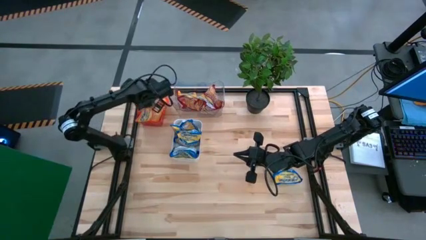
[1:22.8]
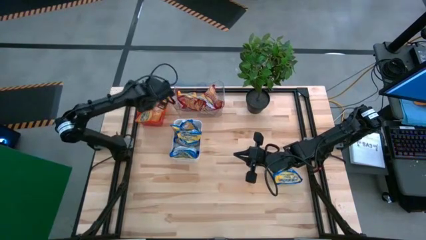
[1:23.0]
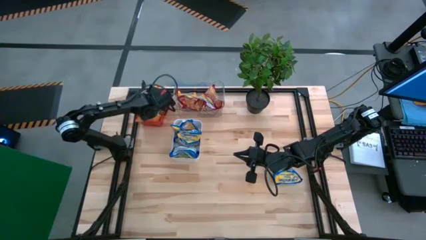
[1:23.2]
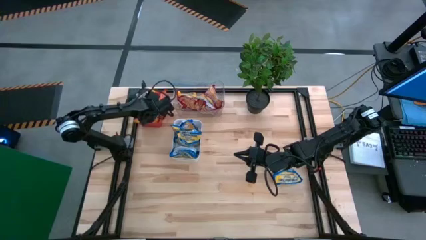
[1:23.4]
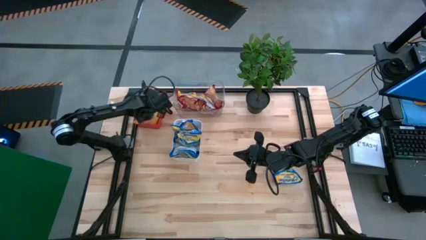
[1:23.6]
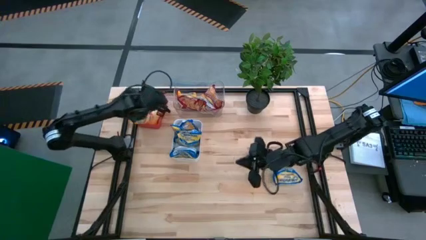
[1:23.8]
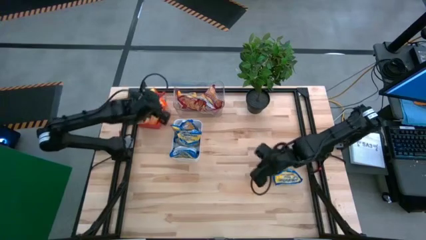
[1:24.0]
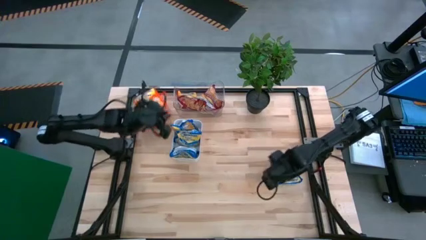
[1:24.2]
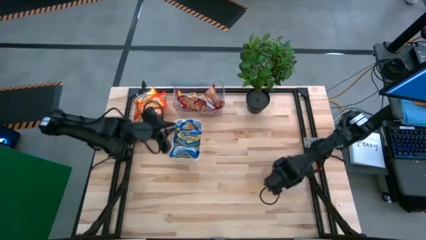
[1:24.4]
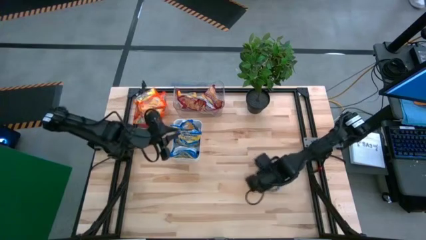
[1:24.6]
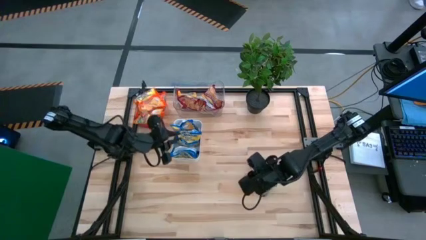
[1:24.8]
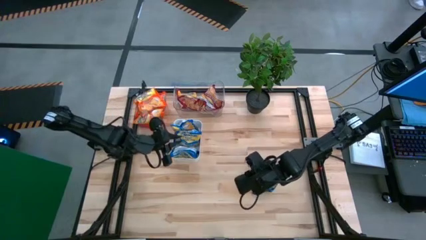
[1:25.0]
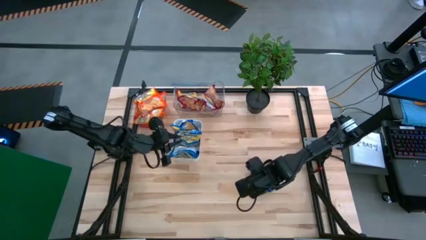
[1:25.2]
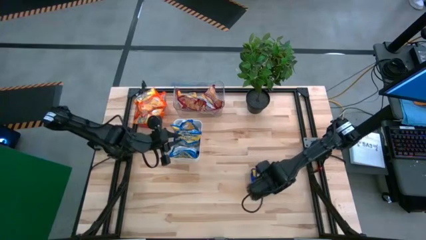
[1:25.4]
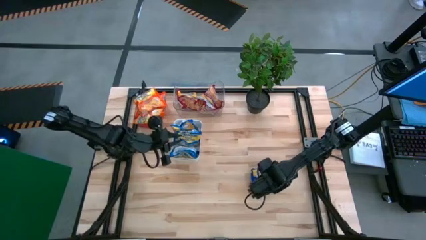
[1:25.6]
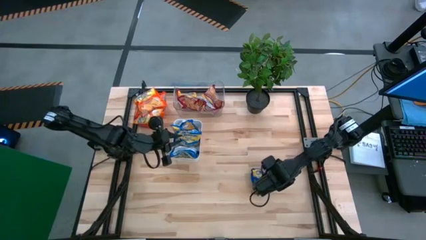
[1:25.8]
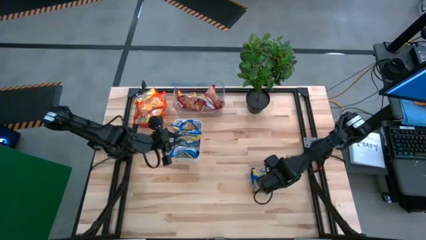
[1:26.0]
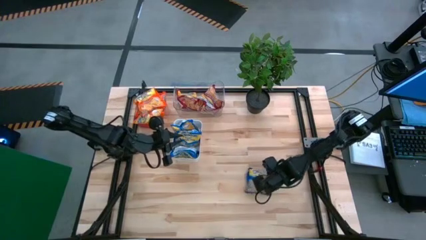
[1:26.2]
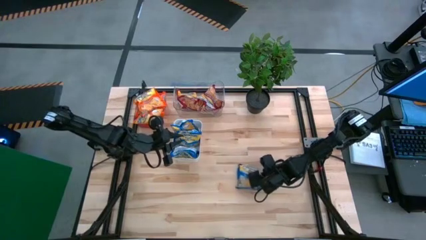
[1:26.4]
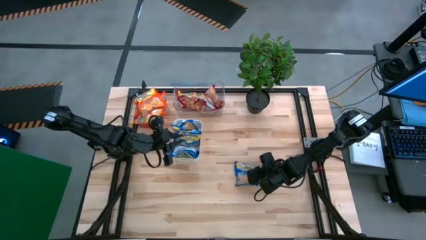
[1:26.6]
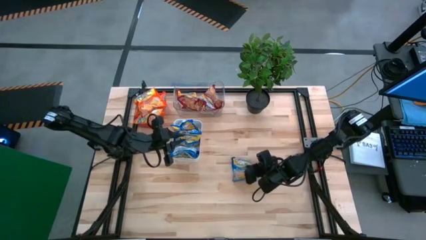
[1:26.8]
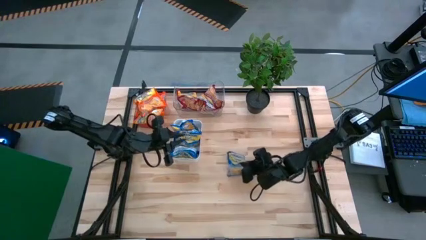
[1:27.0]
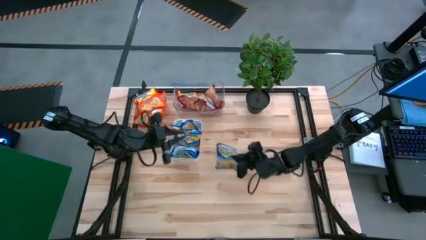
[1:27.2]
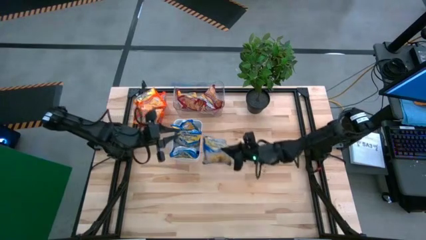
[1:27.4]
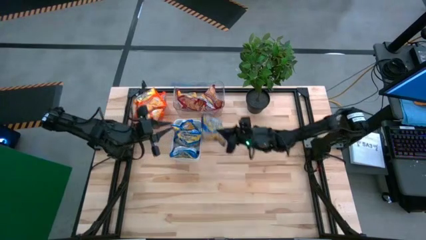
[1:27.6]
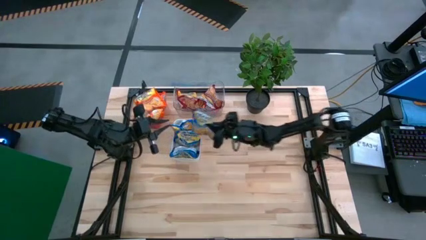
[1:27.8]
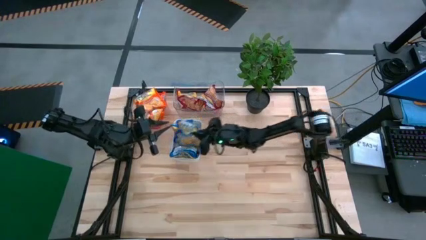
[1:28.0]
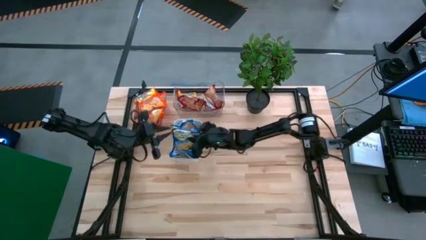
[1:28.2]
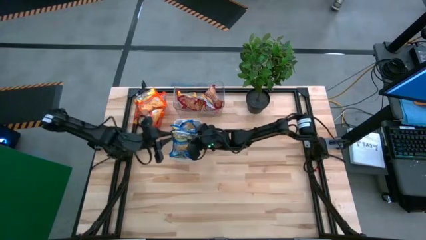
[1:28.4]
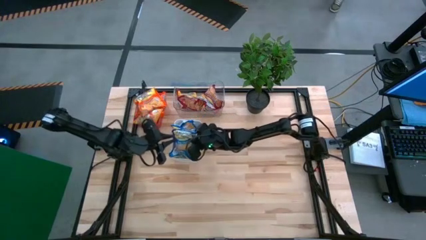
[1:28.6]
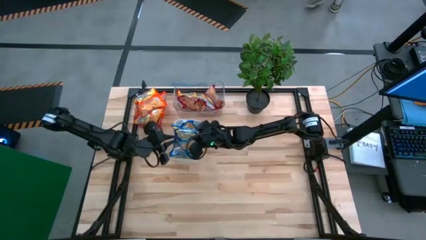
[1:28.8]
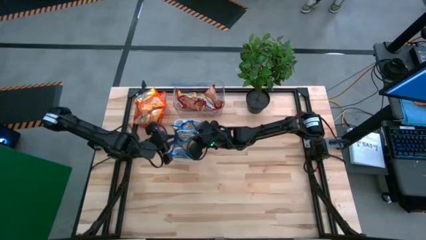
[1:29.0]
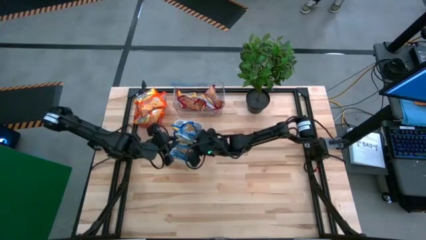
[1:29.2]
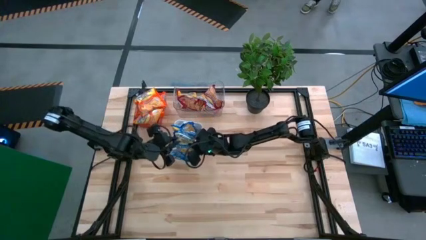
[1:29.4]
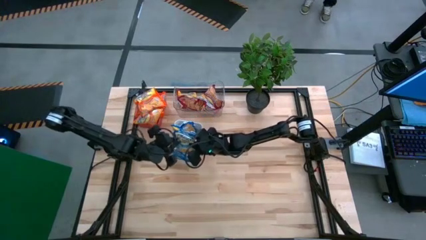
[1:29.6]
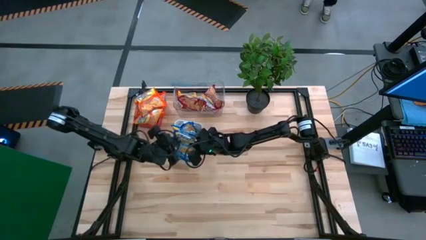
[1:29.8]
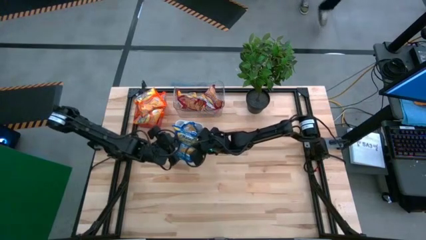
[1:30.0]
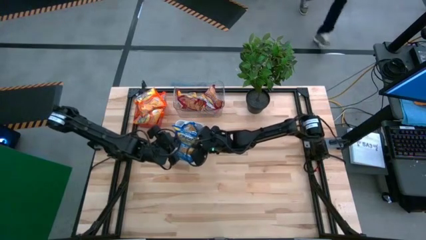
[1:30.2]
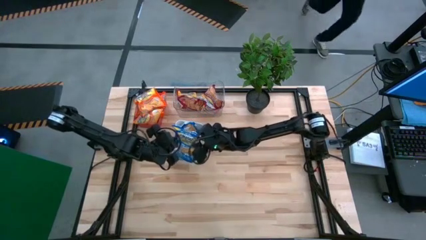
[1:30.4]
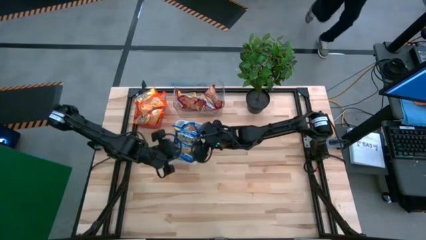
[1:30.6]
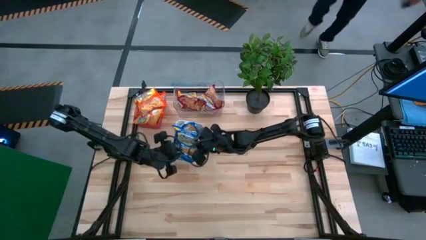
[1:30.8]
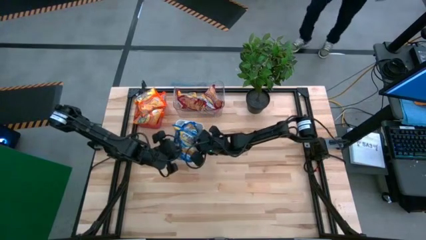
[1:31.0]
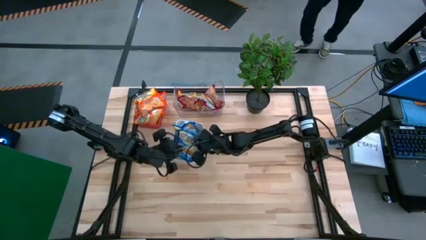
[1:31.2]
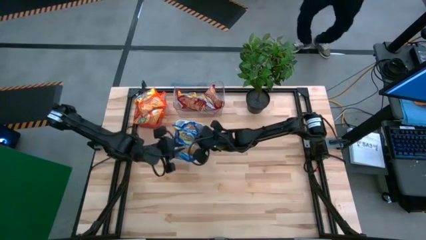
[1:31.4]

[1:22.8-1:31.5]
Task: Sort Maruchan noodles
Put the blue noodle pack into the white bin

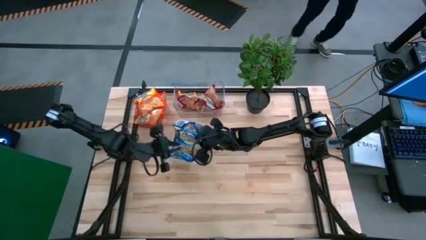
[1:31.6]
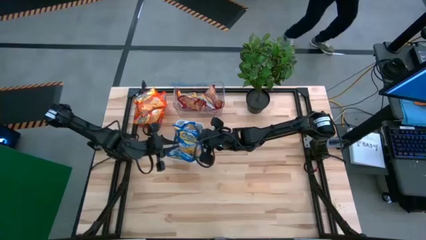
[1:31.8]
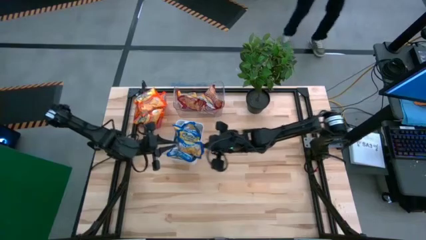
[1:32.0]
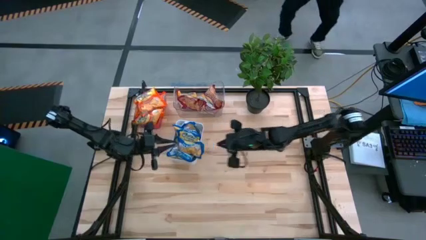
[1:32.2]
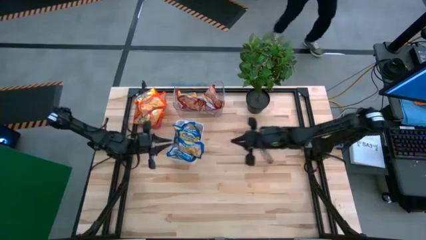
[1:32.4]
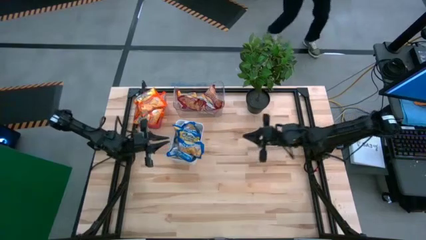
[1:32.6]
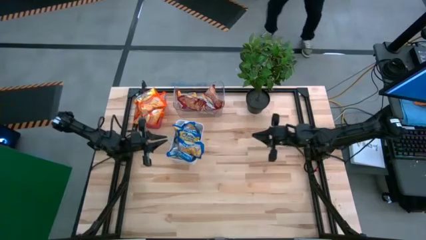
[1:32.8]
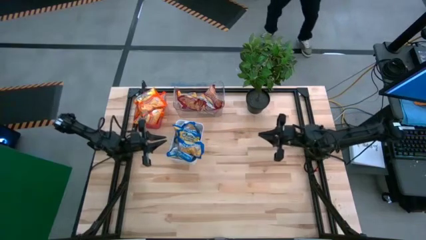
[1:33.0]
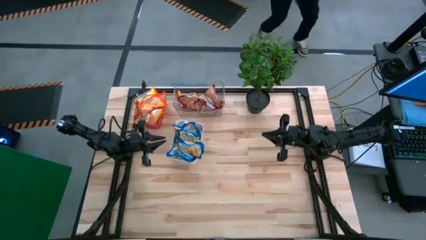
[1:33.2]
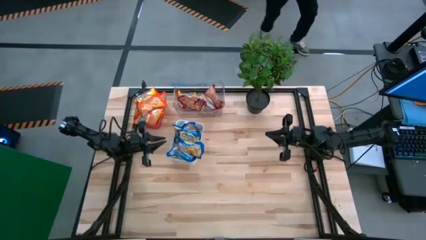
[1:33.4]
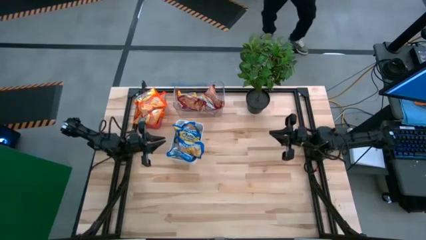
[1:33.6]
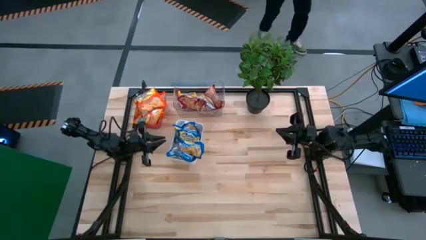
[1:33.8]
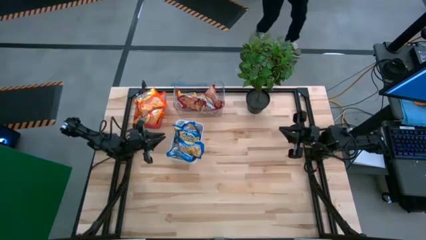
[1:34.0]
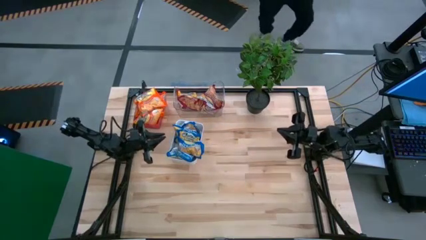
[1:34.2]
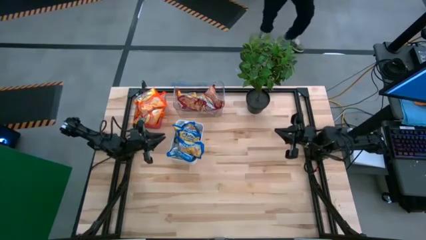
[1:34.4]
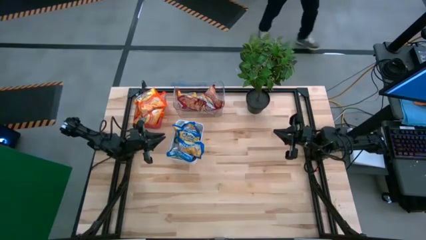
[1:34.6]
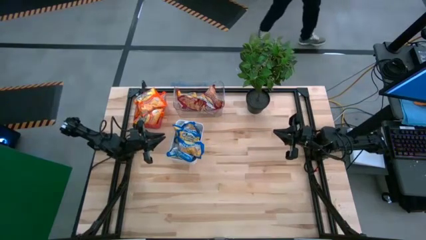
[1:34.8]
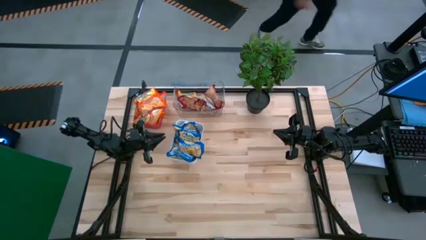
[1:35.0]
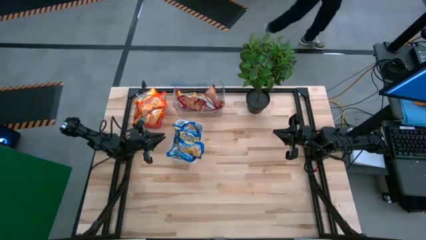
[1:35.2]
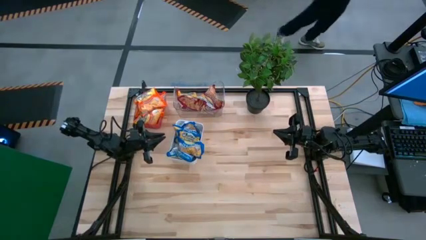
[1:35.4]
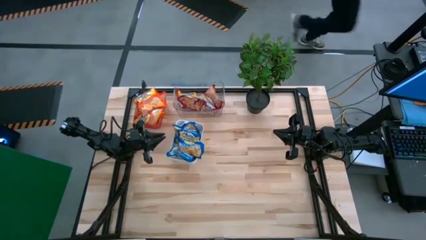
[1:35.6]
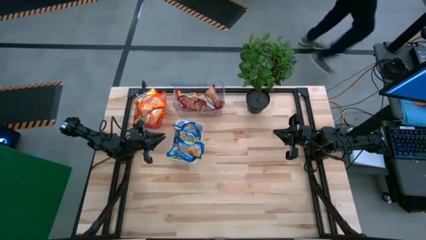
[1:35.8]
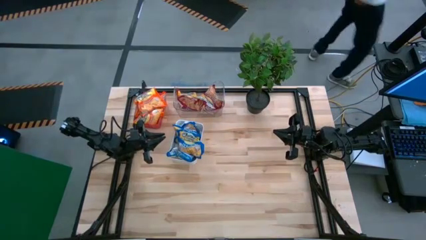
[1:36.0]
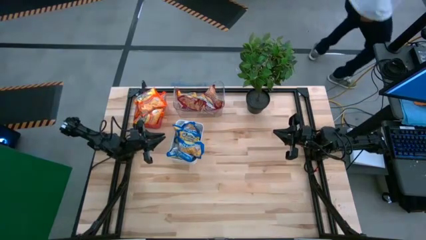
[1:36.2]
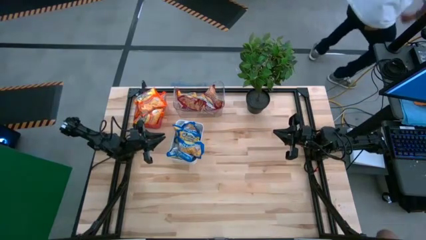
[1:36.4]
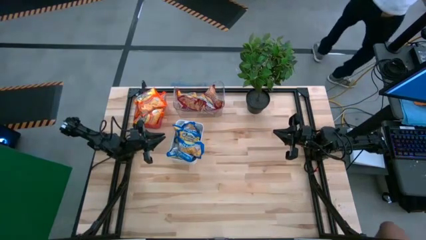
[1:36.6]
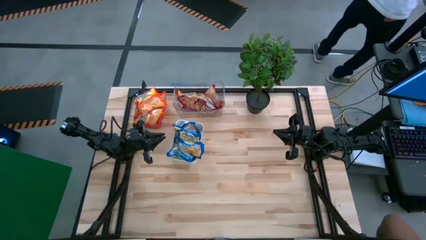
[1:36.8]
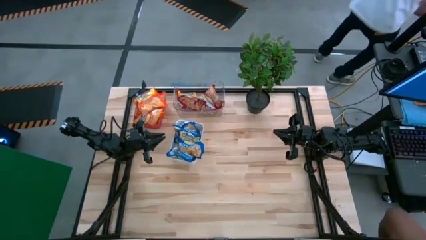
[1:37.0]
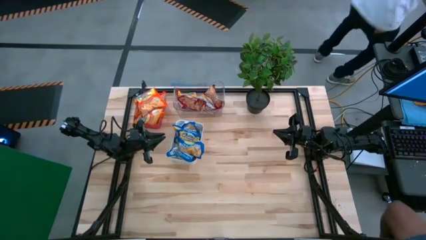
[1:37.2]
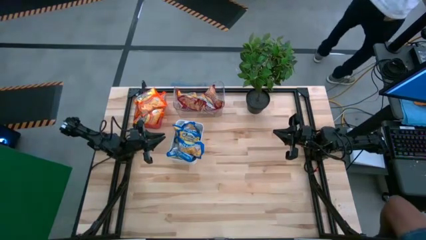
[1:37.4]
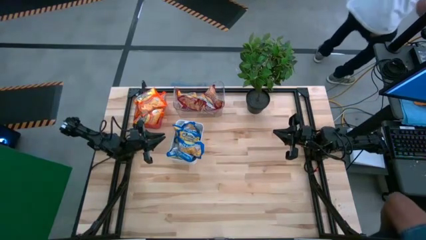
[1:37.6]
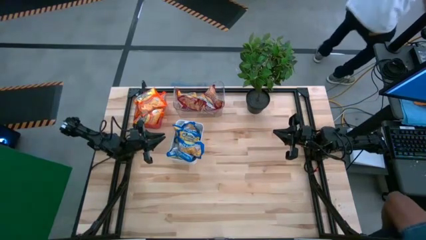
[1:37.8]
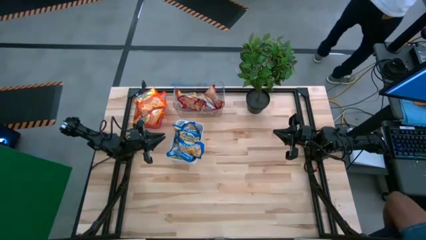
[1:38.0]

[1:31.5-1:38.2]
Return to Home Position

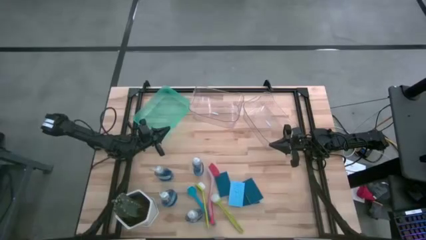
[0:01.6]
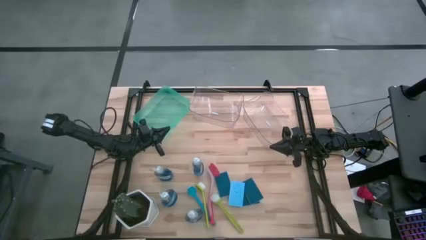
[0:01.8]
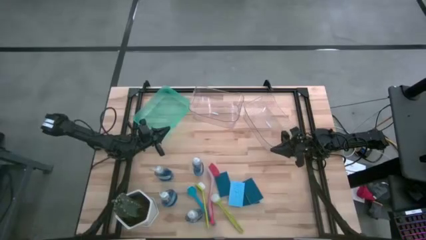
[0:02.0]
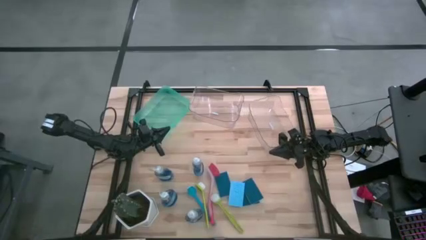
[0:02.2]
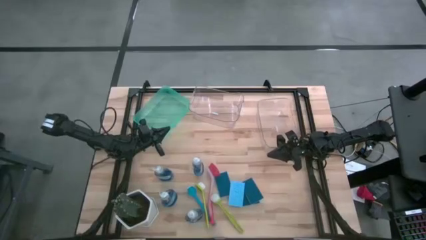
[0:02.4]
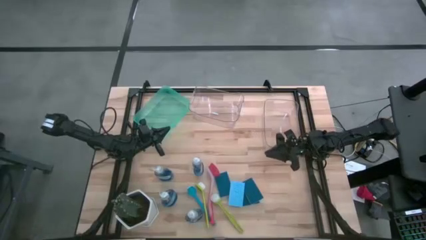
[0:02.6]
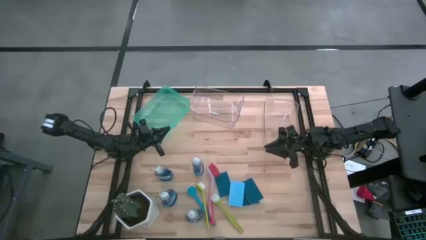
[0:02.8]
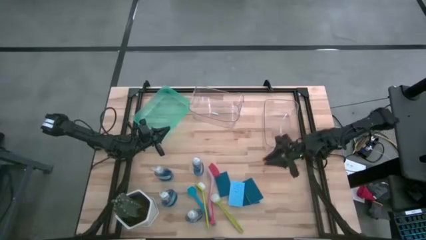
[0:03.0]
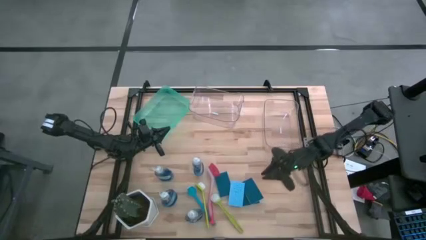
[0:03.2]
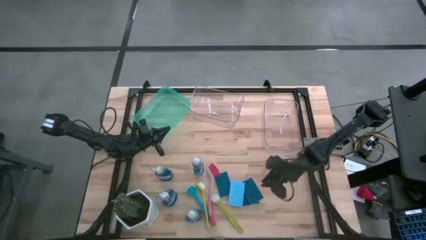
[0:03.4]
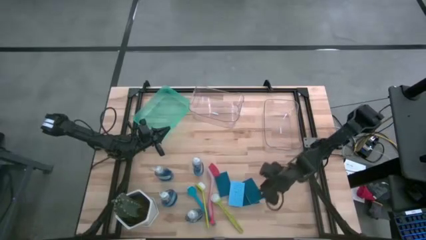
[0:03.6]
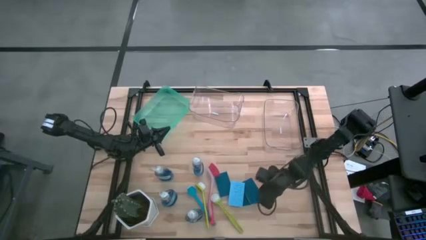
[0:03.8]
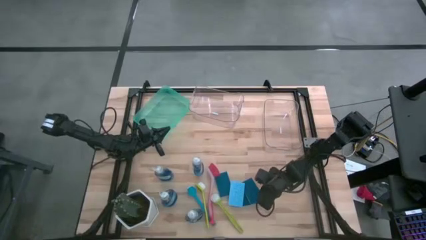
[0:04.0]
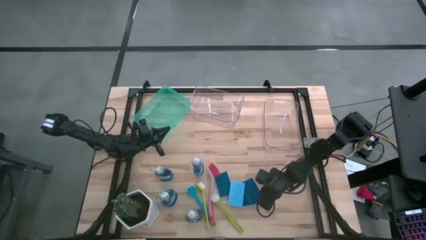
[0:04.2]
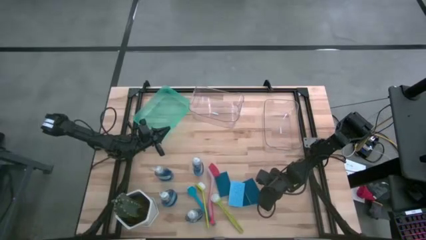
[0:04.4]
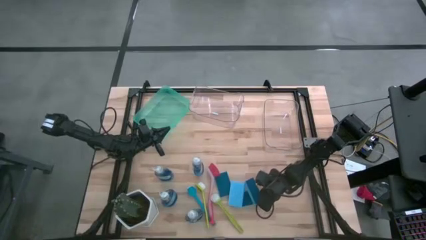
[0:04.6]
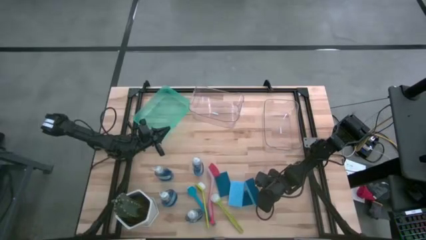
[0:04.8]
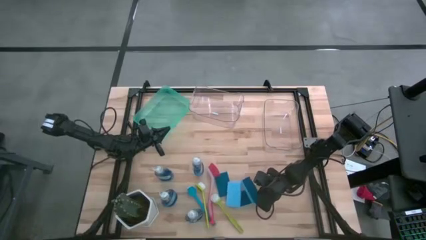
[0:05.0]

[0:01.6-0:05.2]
Task: Pick & Place Kitchen Sink Supplies
Put the blue sponge in the right transparent bin
